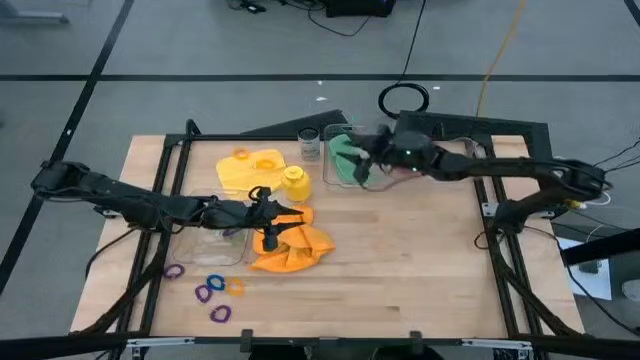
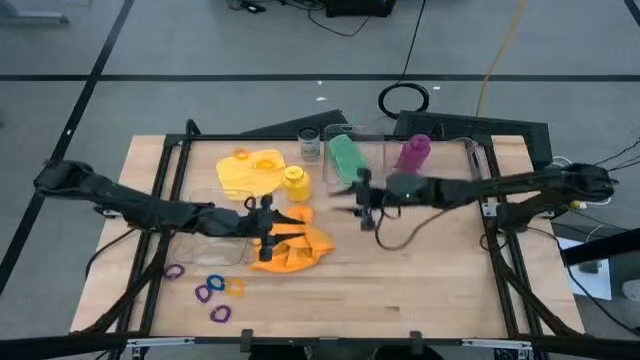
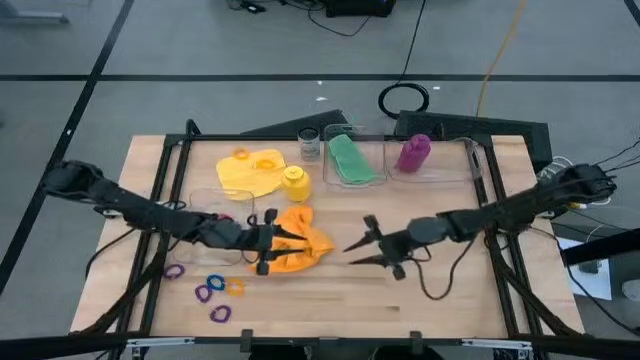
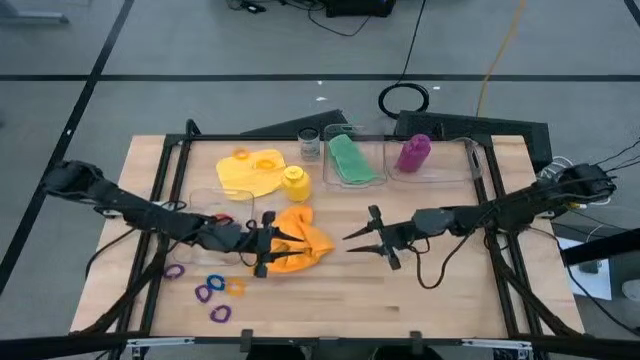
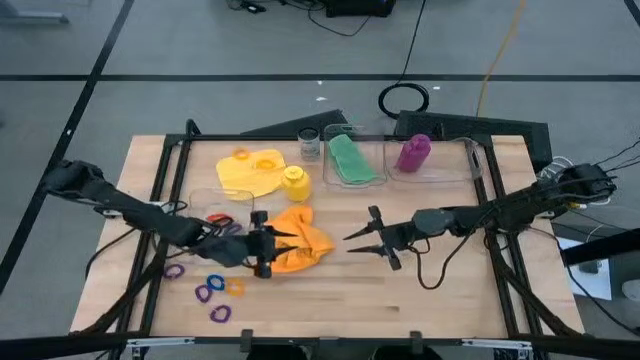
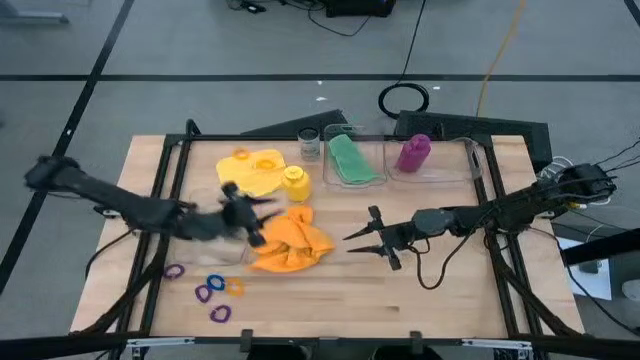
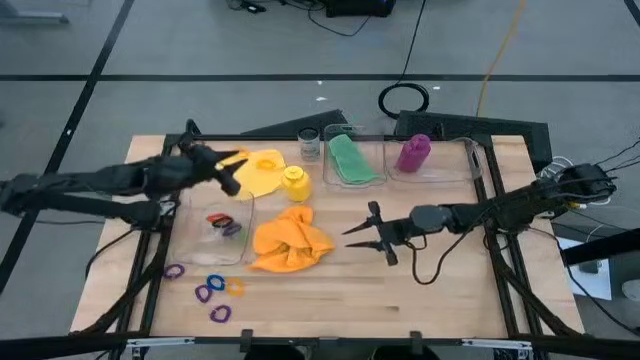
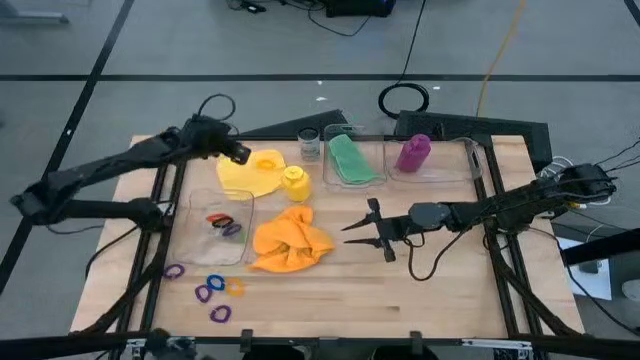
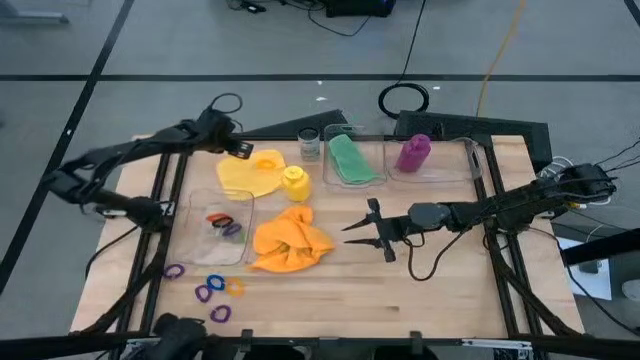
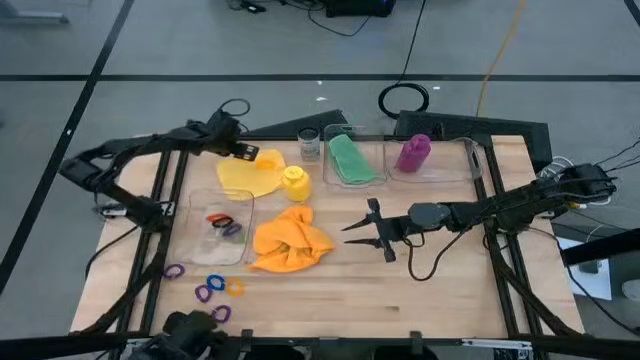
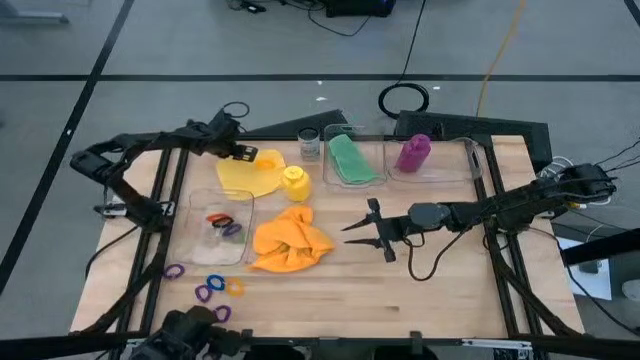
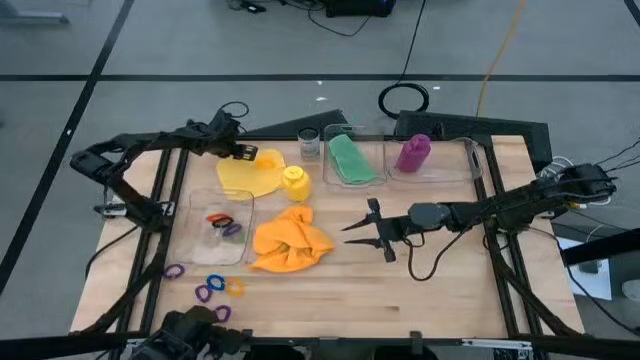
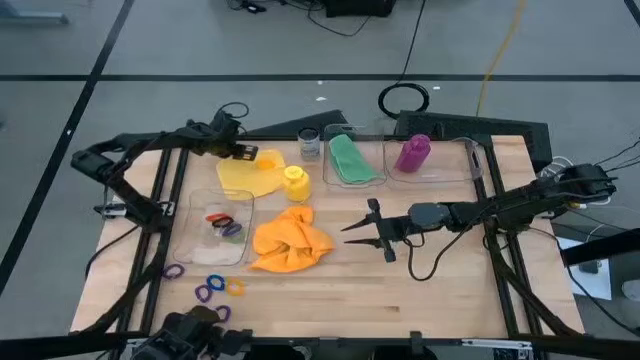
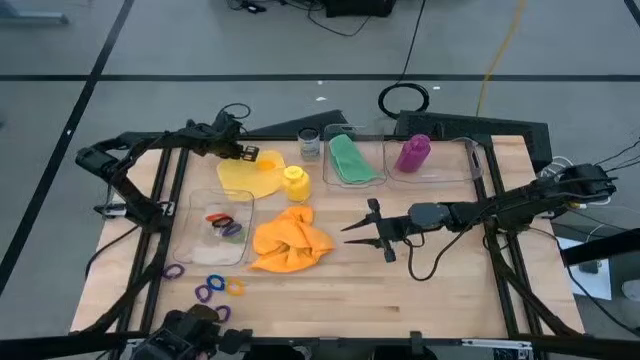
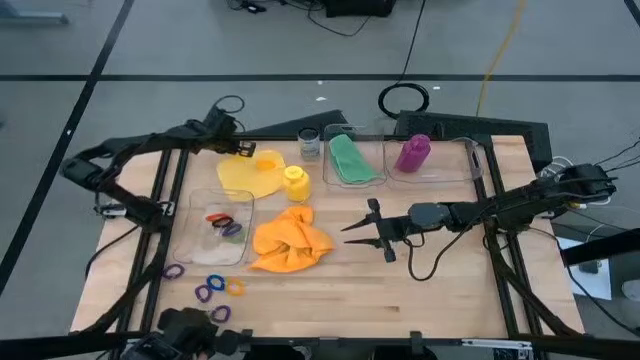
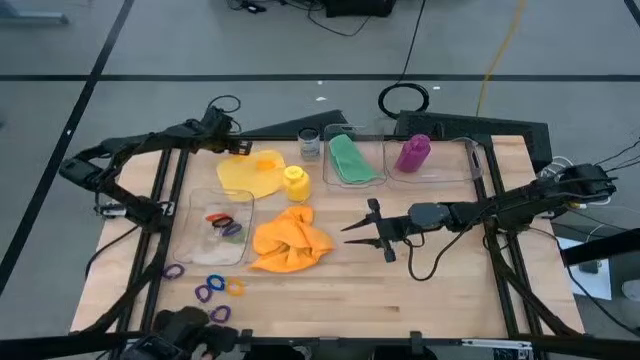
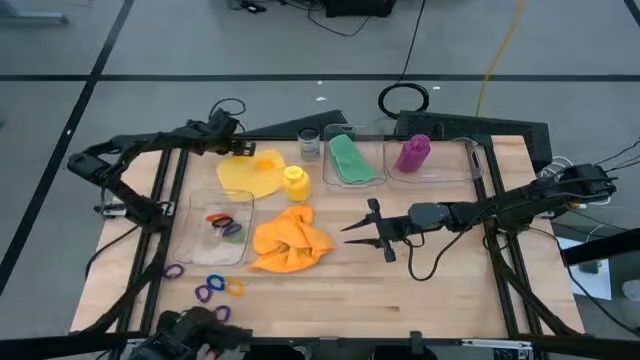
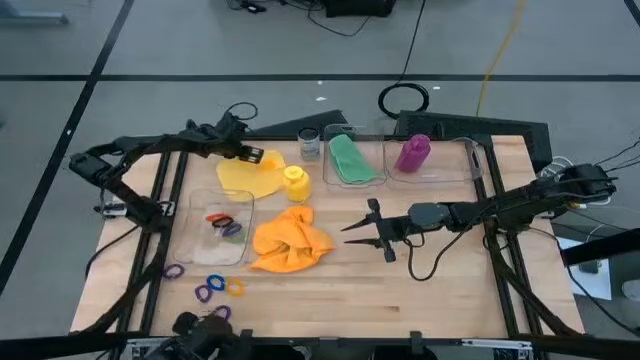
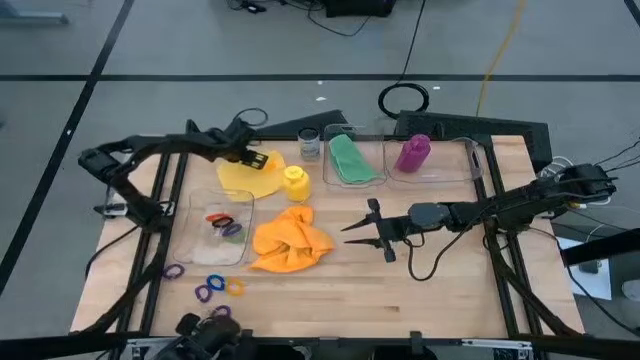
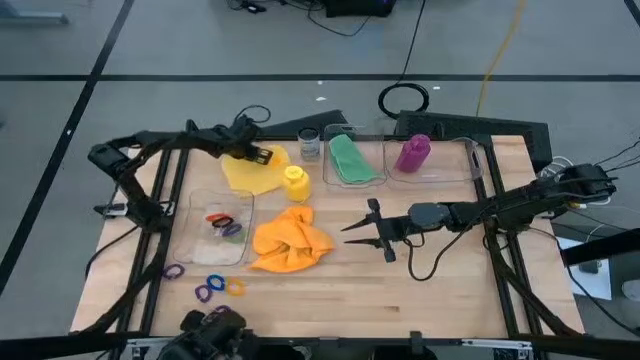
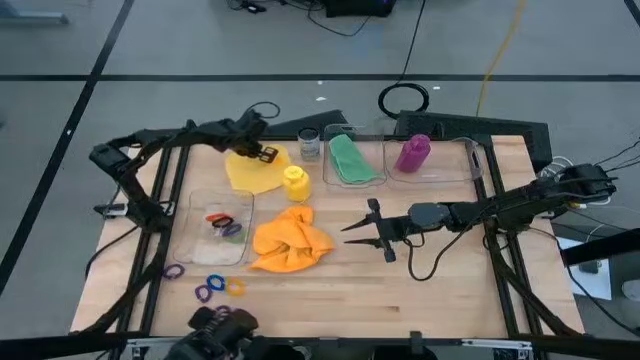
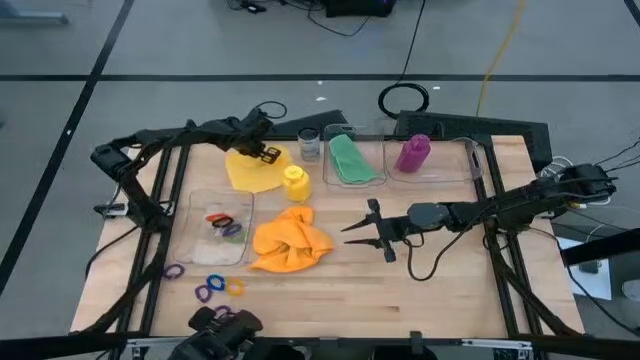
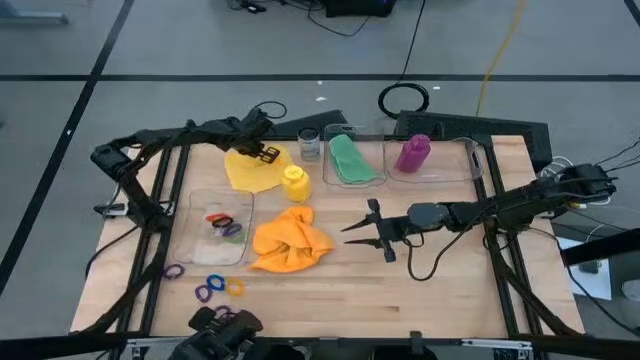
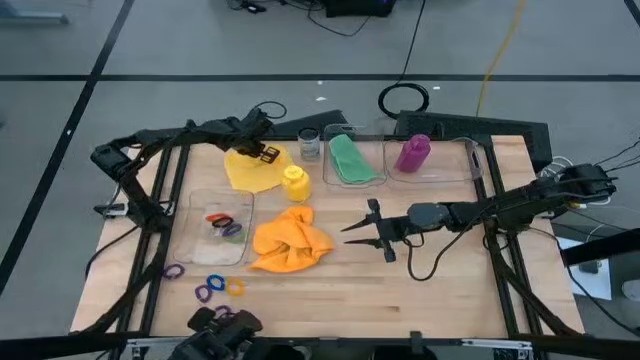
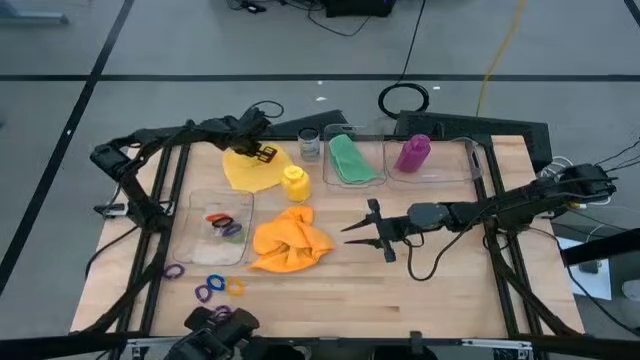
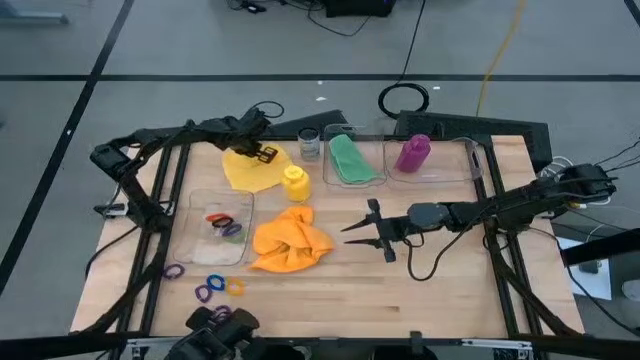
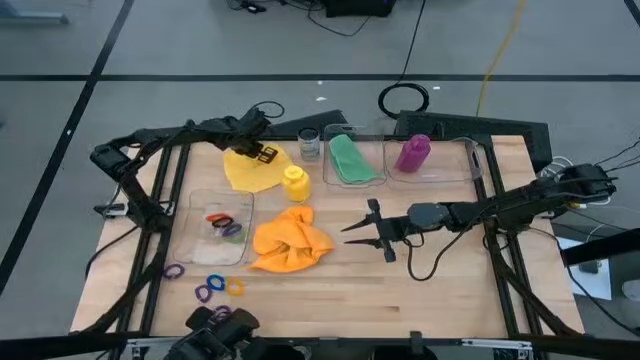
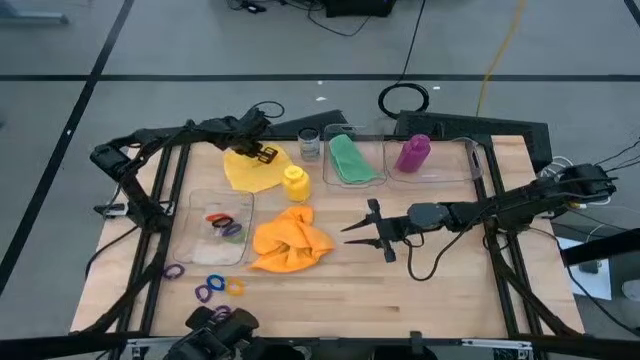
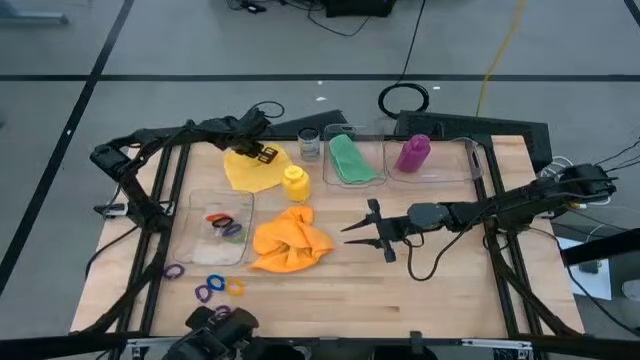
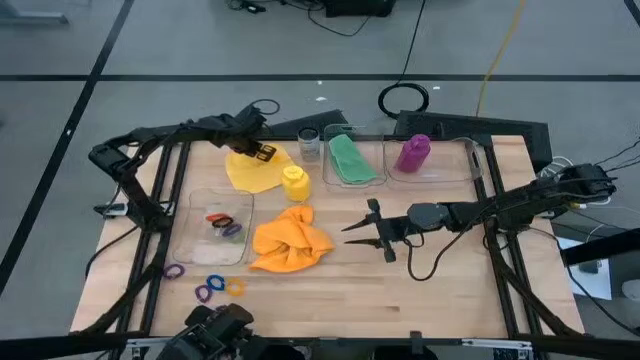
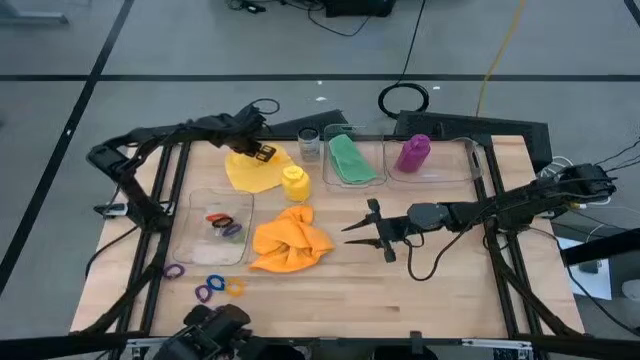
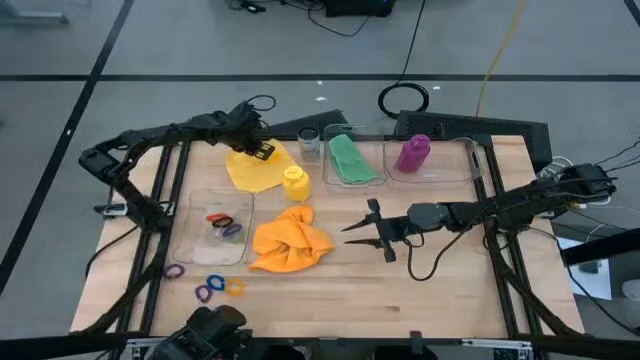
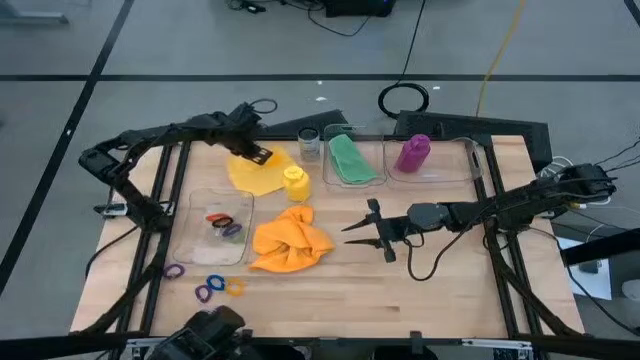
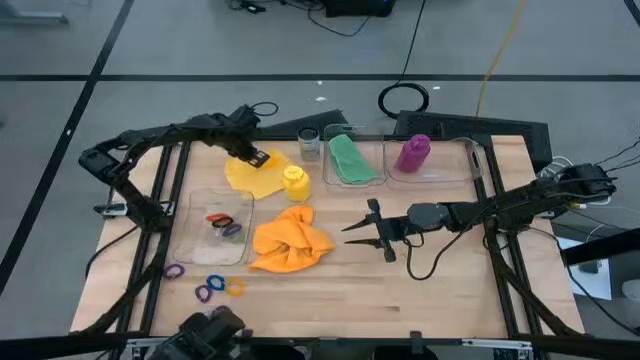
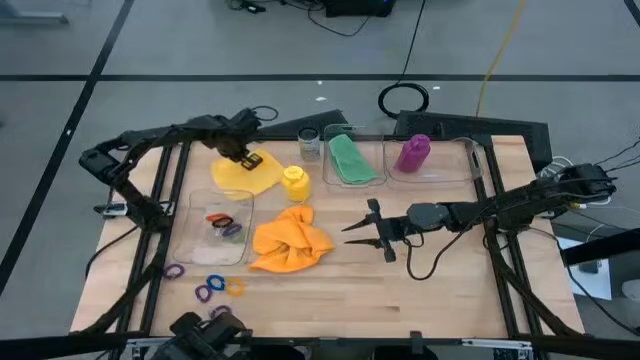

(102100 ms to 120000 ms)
Task: Pick & Place Sports Items
Put the top left yellow spring keychain into the bottom transparent bin

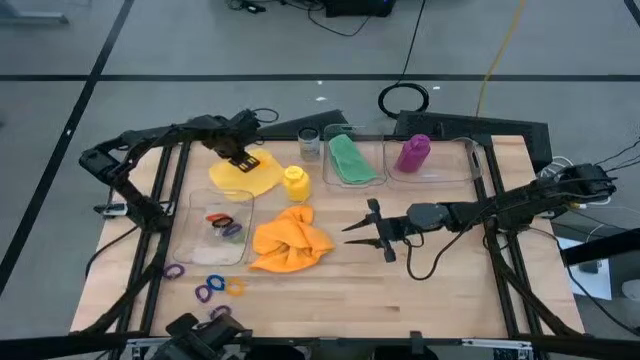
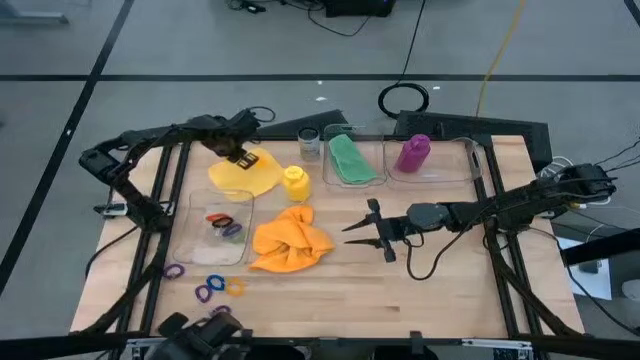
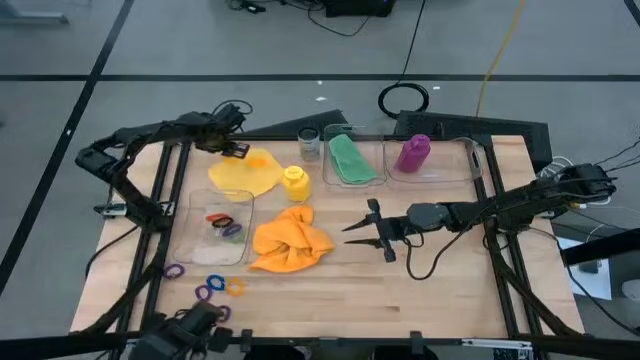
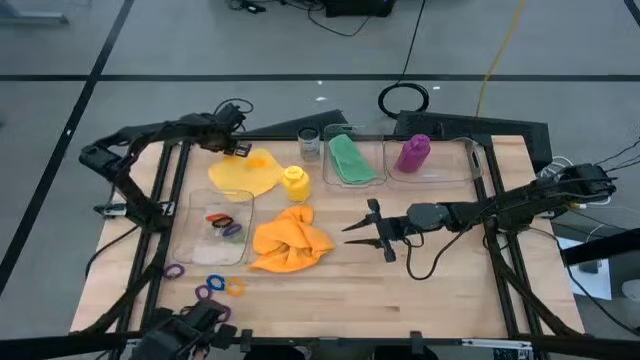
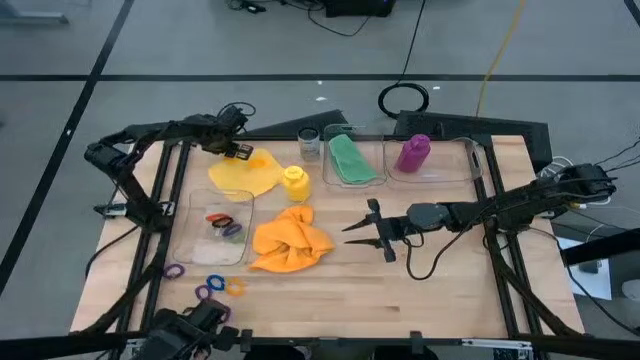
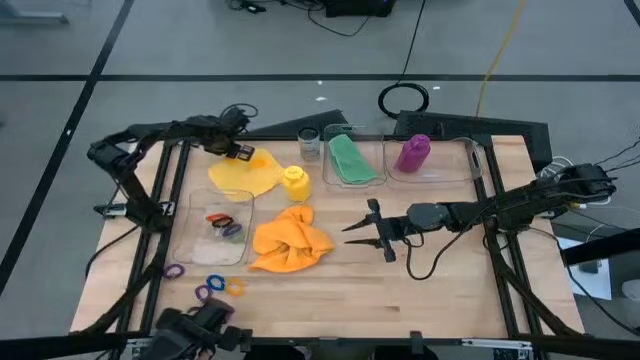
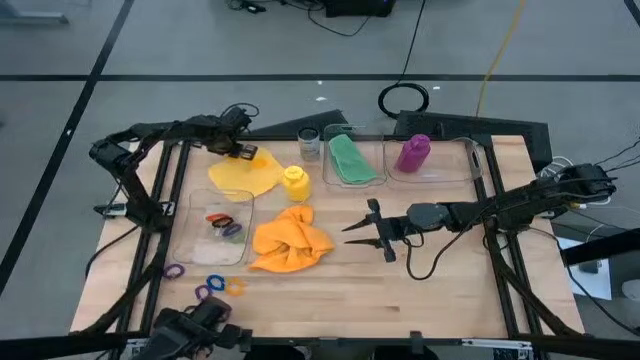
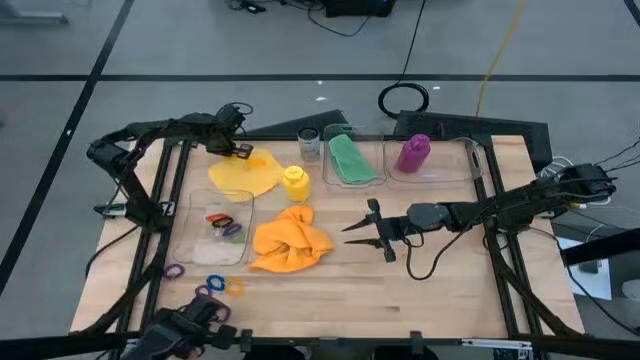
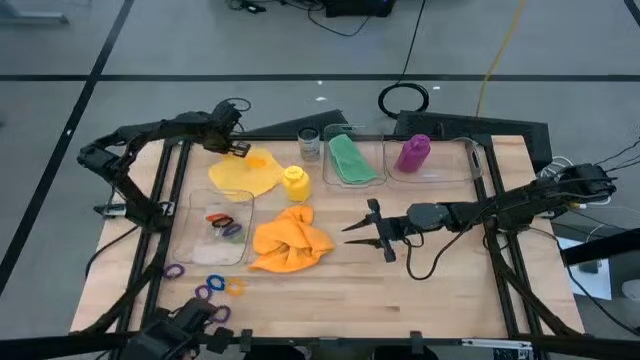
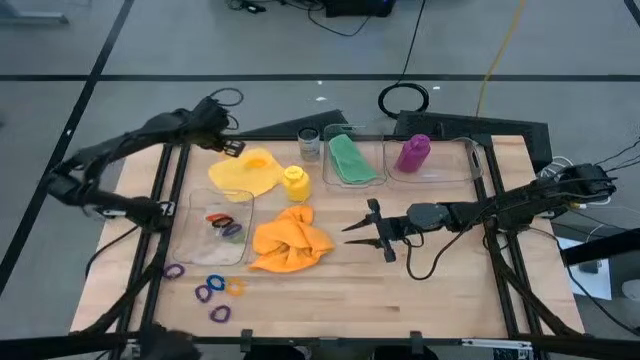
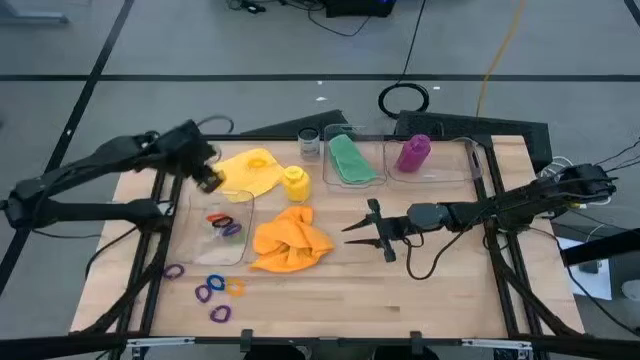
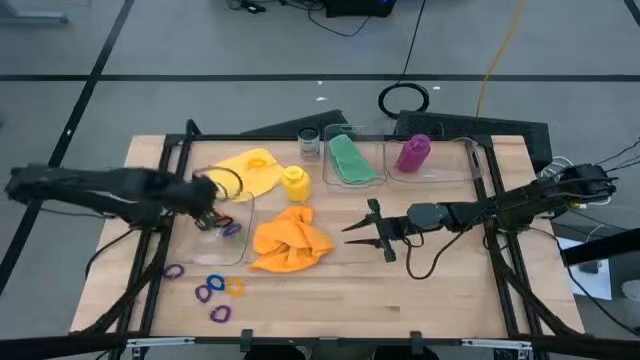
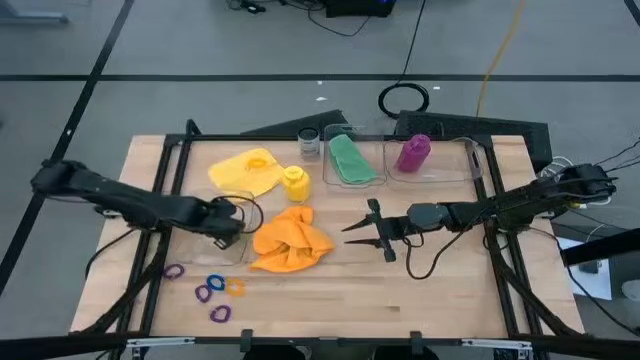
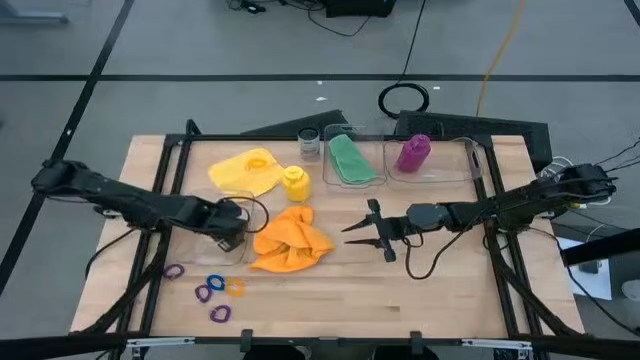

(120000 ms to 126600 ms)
Put the top left yellow spring keychain into the bottom transparent bin
